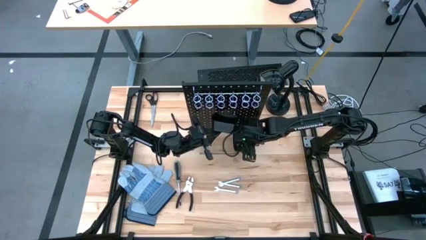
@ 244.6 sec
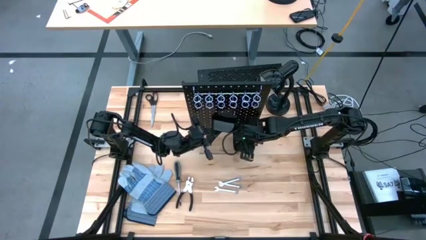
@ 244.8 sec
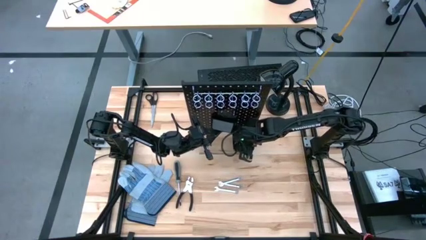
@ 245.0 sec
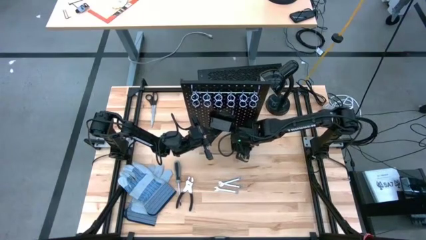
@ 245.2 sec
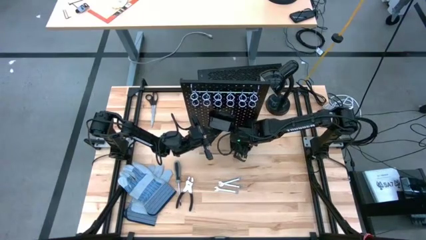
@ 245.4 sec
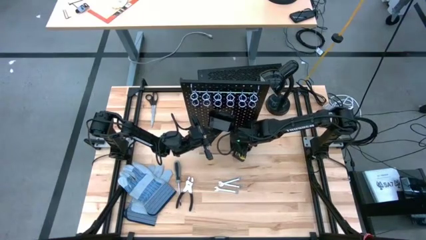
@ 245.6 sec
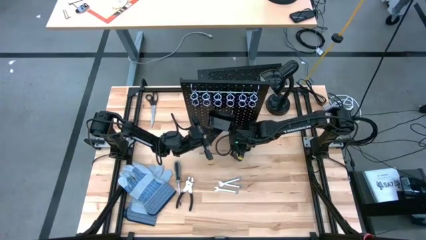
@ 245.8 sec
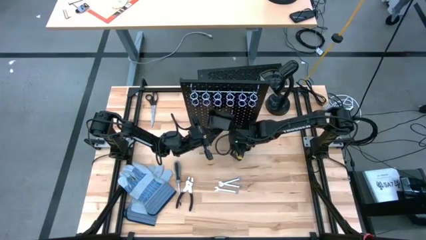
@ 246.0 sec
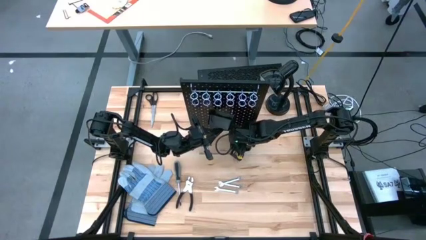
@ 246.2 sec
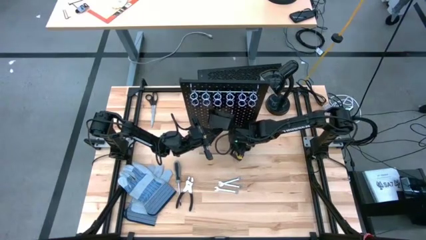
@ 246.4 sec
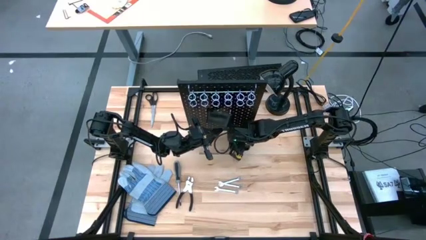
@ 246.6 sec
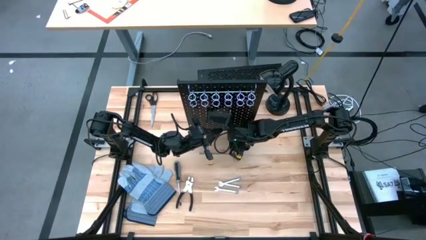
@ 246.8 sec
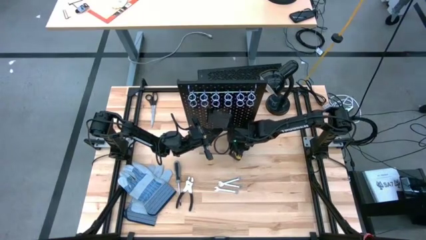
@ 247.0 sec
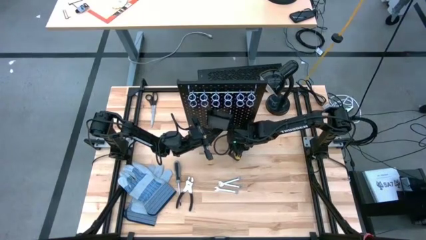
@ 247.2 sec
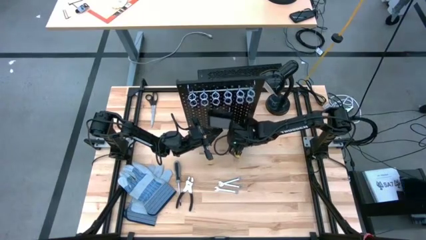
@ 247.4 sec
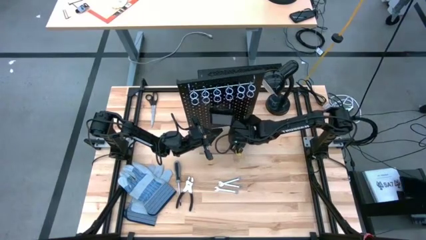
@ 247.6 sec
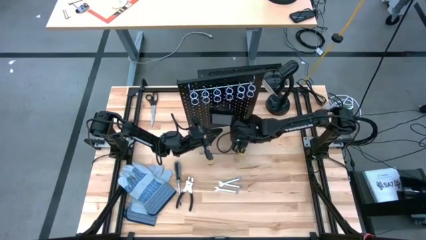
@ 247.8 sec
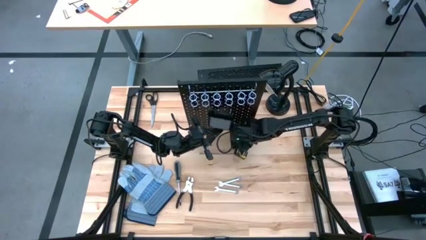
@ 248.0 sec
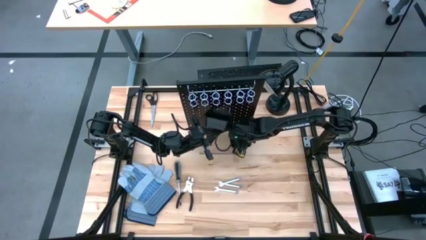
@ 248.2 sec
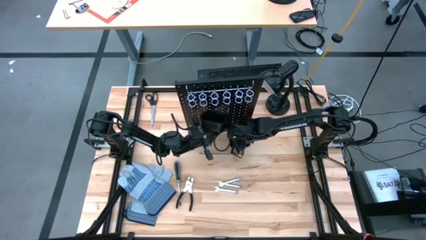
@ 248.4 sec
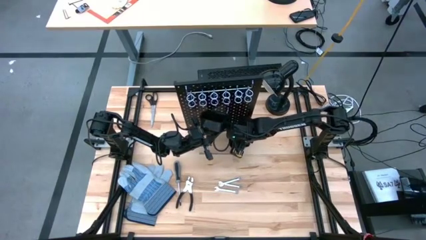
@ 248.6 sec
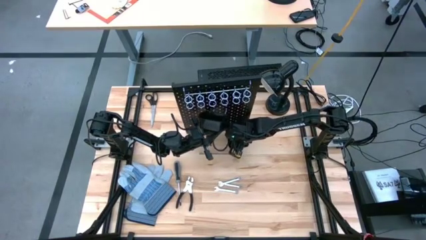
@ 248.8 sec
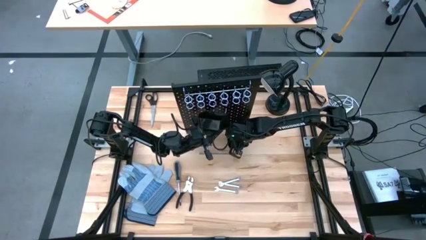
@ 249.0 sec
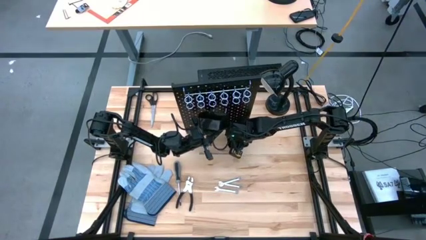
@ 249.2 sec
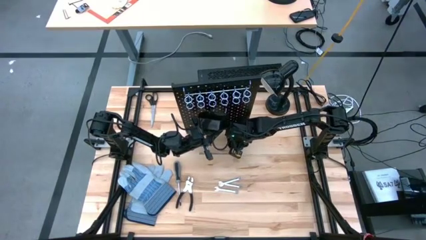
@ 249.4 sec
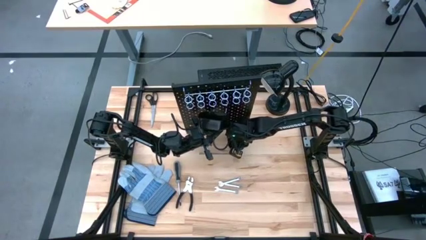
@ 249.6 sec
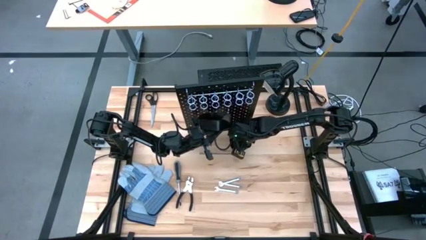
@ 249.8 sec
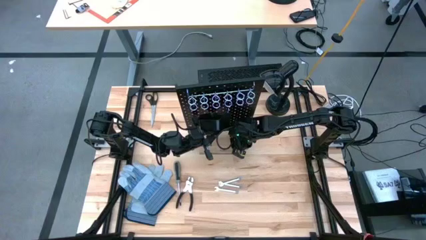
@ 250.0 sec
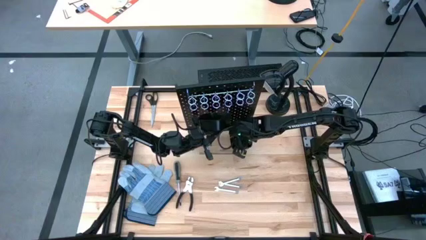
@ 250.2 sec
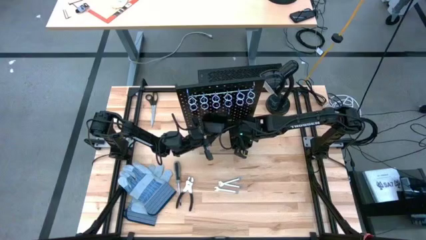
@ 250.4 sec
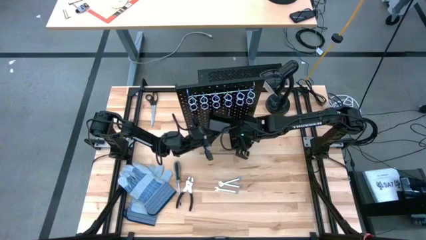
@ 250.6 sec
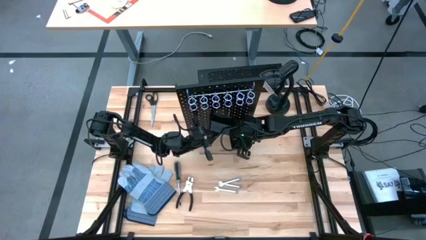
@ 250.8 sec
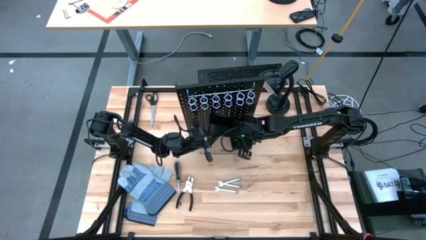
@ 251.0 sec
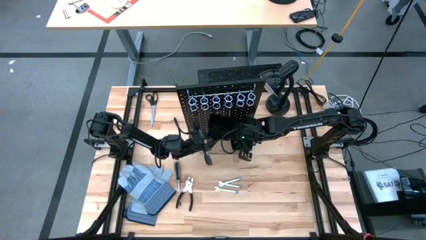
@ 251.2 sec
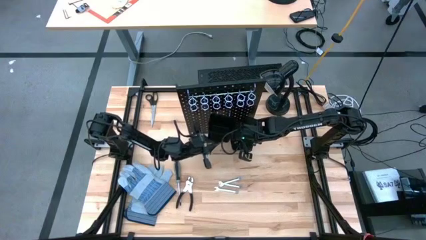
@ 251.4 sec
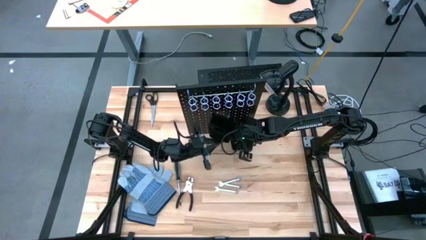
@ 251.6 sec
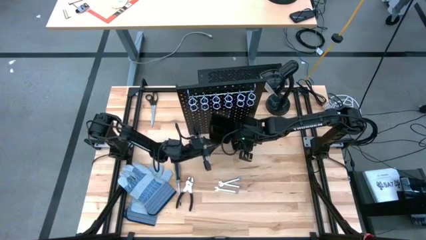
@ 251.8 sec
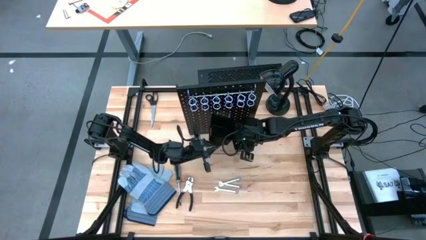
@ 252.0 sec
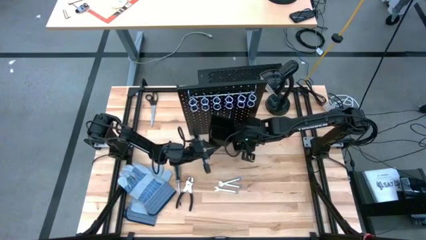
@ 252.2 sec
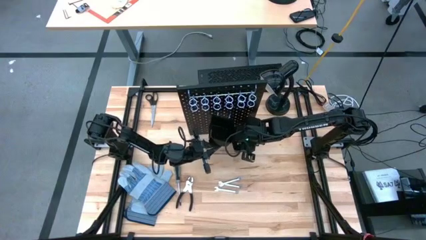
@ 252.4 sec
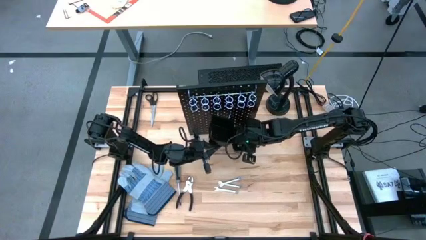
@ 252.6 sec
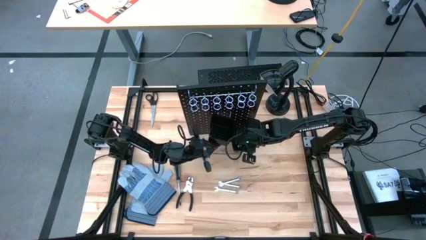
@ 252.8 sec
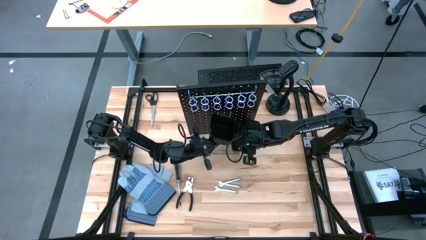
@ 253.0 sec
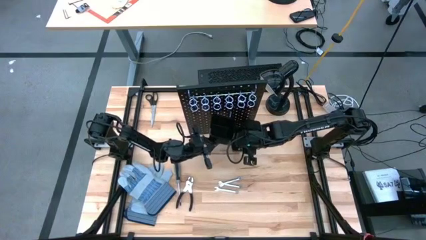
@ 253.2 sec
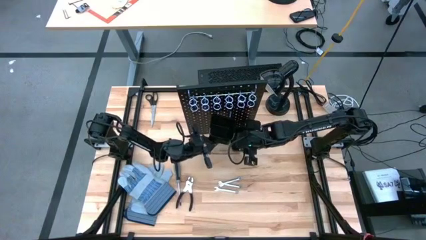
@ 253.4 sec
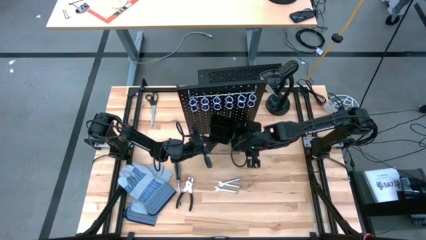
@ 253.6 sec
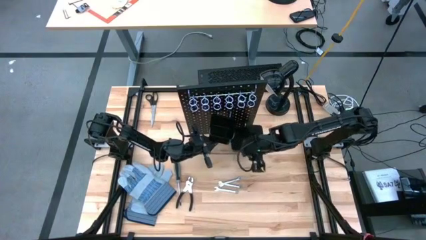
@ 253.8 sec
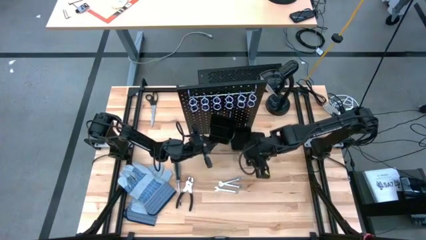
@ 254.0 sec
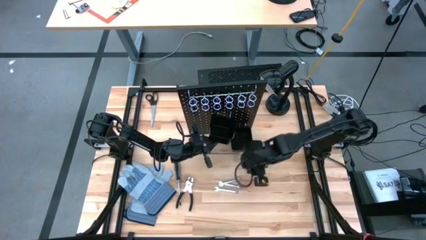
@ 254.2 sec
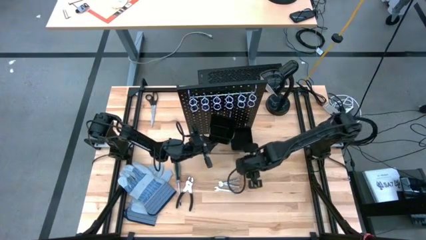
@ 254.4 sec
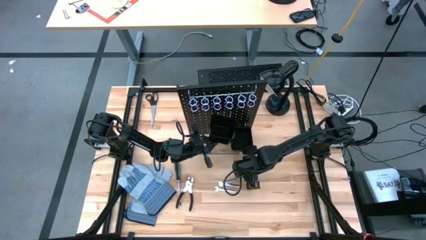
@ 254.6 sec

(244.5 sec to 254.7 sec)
Task: Hang tools onto peg board
Remove the black utility knife blades from the bottom black bin of the black pegboard

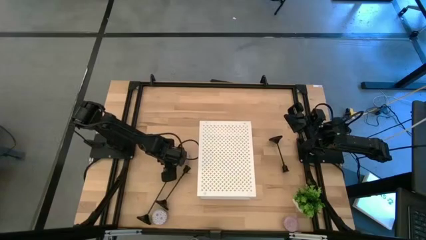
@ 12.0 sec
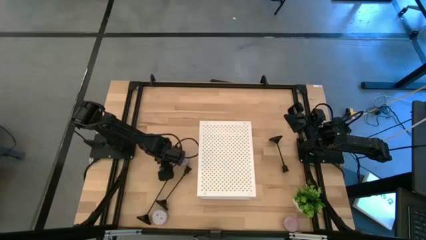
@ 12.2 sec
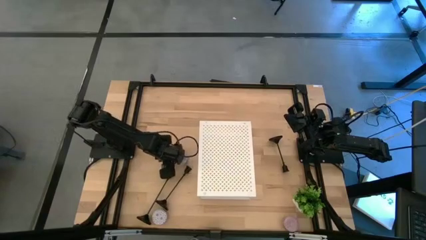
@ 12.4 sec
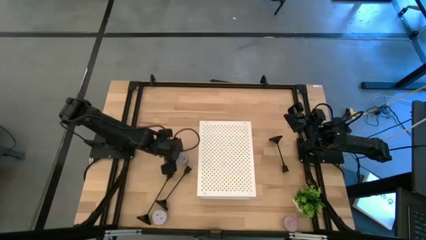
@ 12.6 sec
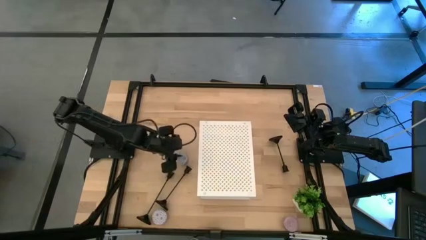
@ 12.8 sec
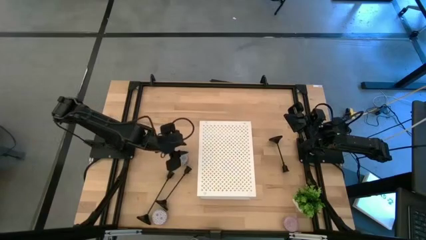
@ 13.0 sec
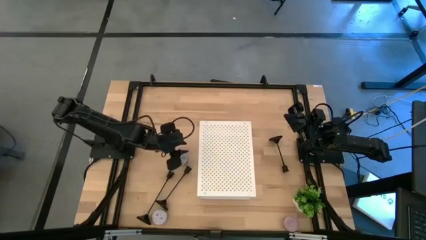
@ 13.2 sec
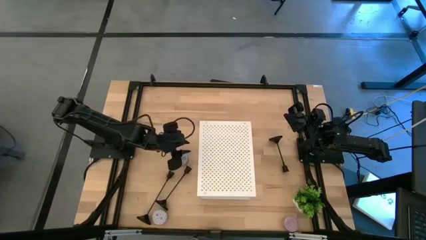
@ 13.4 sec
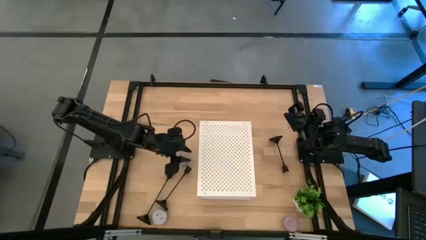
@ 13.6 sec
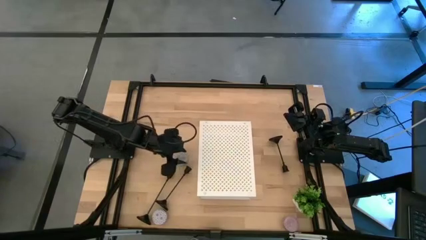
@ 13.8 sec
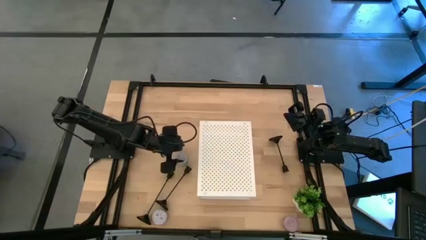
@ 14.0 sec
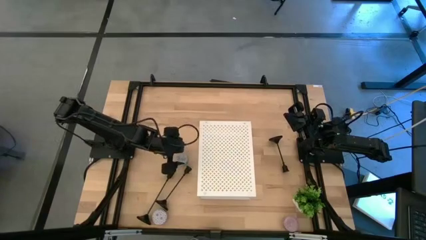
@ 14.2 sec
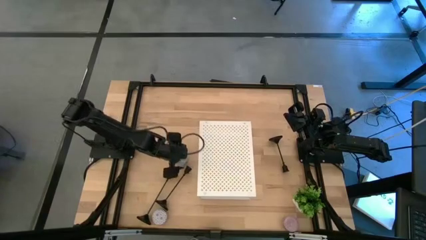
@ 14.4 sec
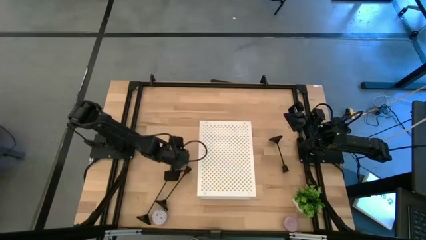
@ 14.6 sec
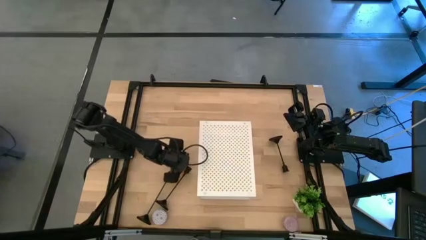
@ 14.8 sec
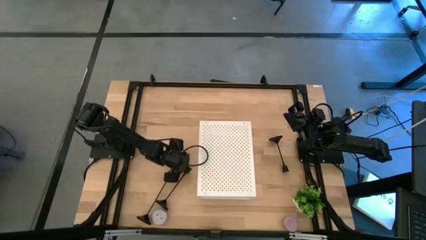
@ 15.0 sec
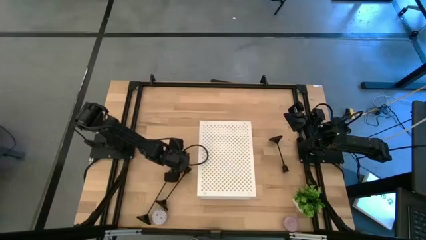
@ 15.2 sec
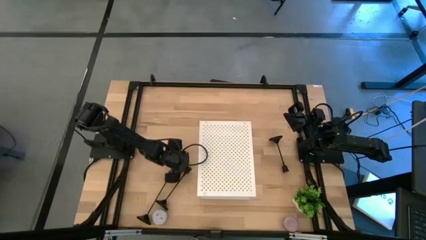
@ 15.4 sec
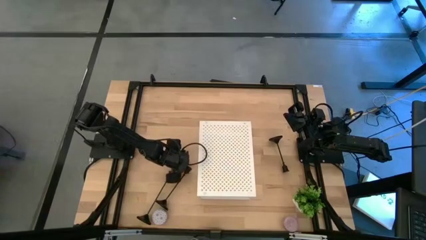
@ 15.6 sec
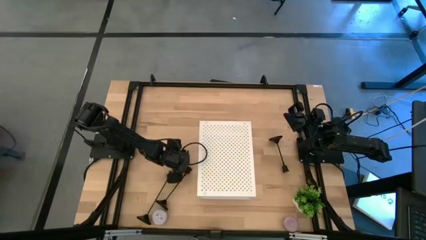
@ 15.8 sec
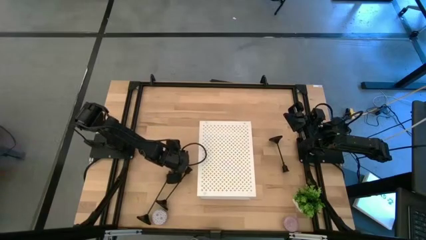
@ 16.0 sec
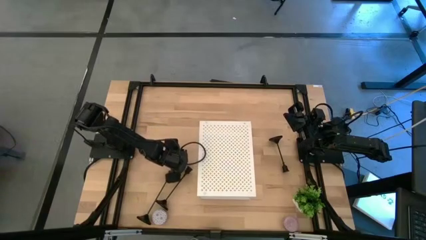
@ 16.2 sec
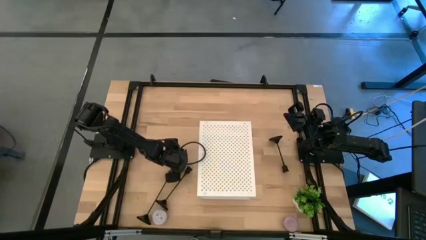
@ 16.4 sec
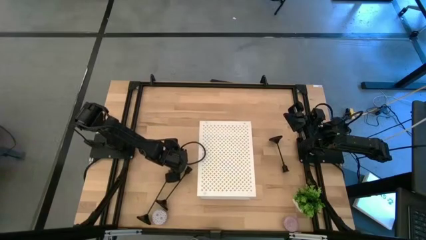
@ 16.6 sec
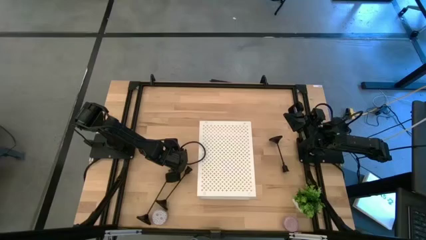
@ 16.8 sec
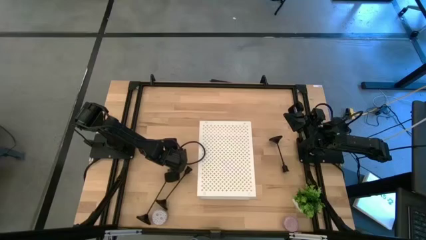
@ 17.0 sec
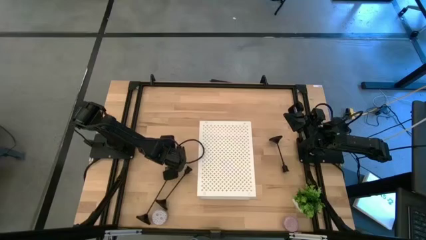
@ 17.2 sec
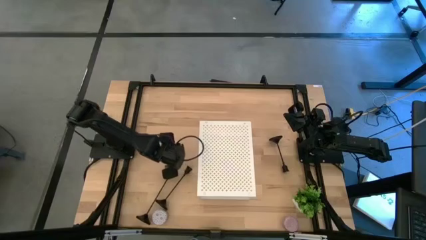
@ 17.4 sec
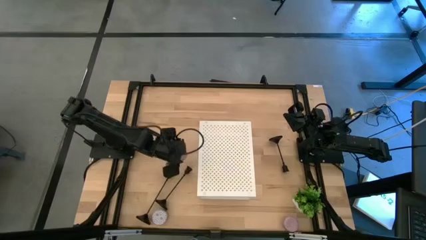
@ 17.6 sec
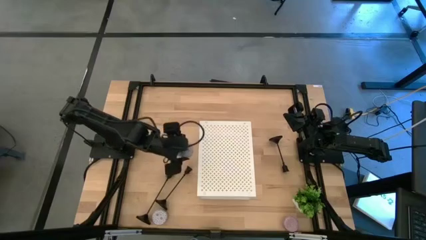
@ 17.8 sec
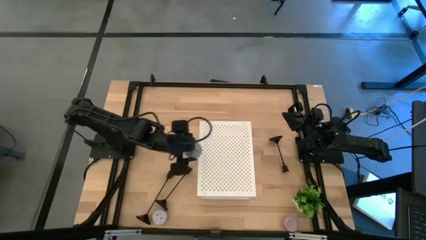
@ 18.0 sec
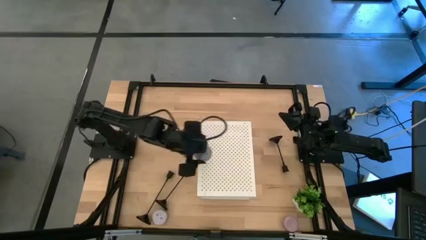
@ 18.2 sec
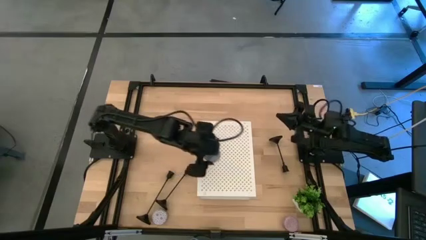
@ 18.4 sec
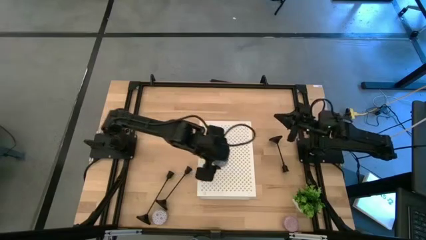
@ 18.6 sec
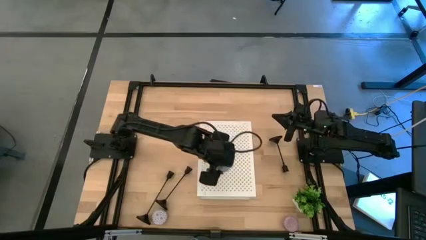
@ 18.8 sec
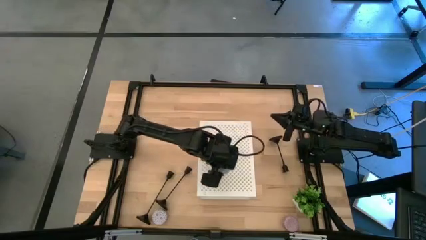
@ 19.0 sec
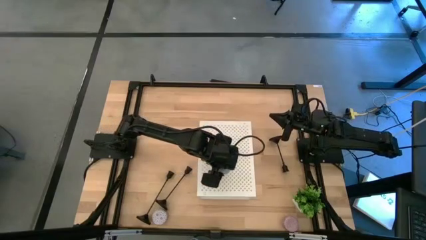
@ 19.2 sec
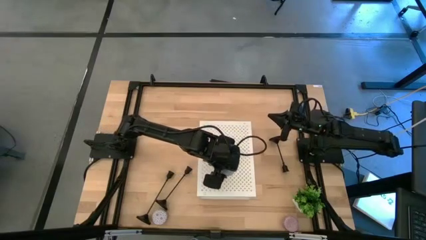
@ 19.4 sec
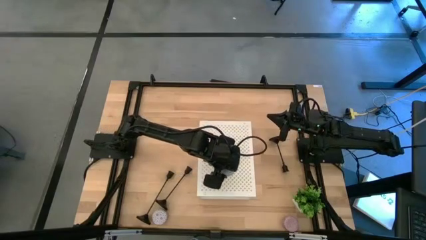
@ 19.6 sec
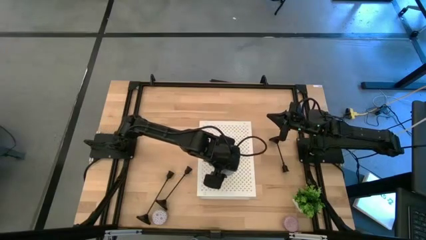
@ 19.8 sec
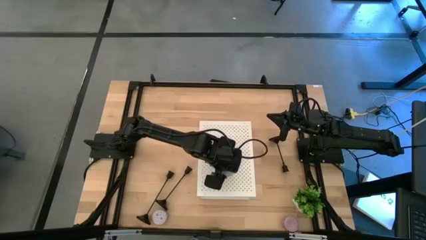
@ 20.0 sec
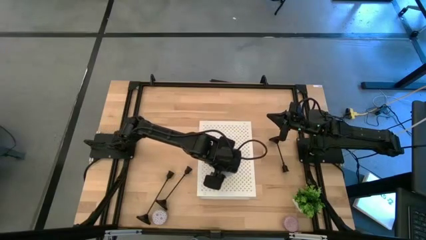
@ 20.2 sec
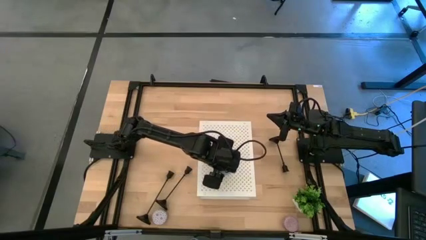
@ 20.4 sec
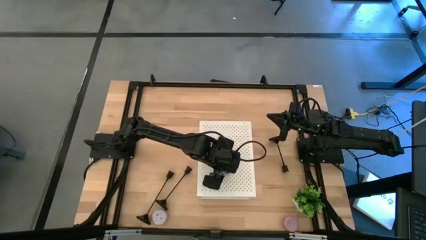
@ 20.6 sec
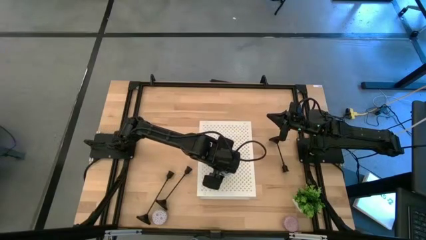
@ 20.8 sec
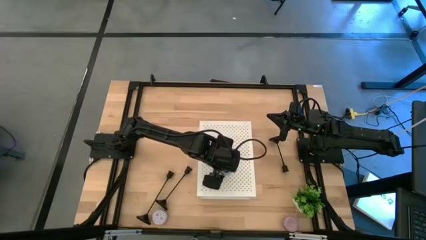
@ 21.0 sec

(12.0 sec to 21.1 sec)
Task: Pick & Place candle stick holders
Put the blue scented candle on the shelf
